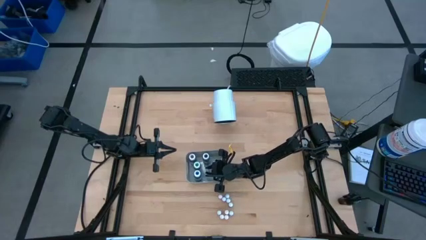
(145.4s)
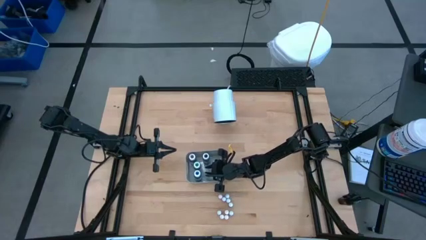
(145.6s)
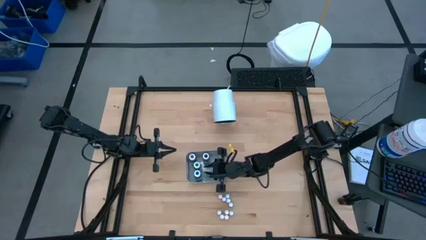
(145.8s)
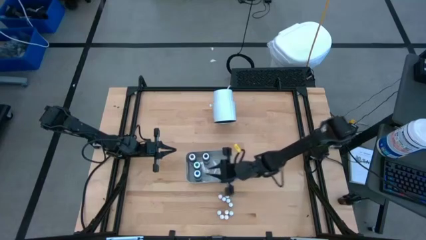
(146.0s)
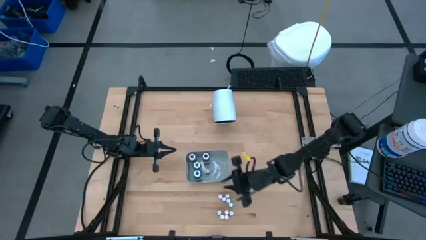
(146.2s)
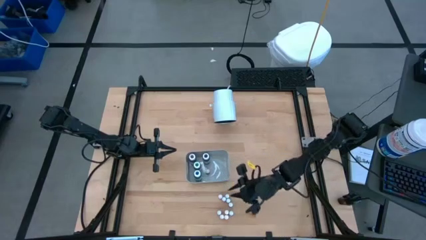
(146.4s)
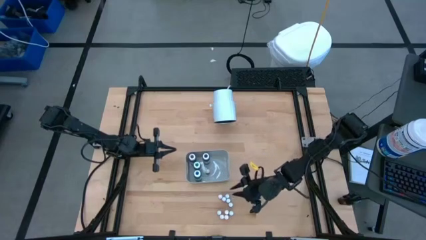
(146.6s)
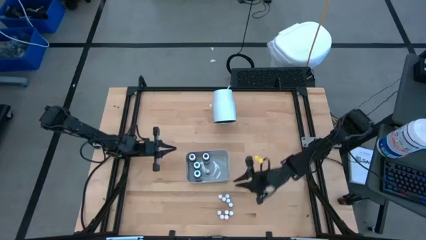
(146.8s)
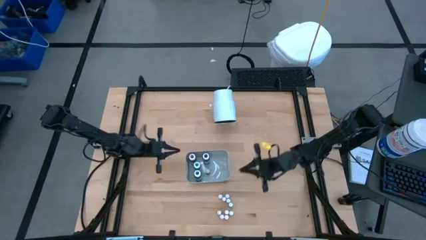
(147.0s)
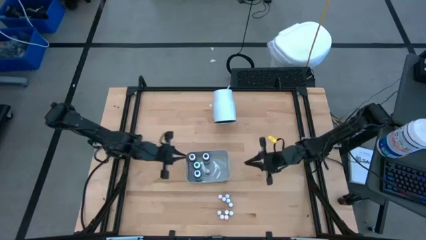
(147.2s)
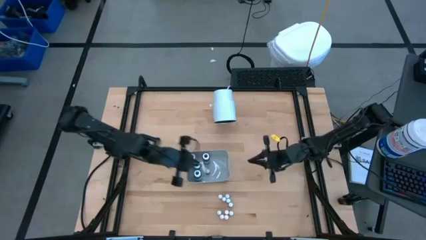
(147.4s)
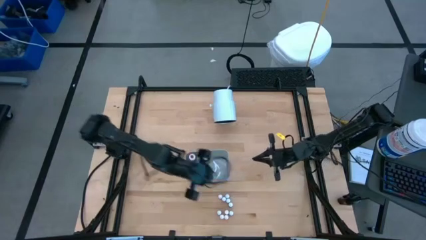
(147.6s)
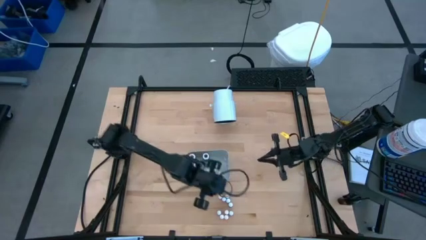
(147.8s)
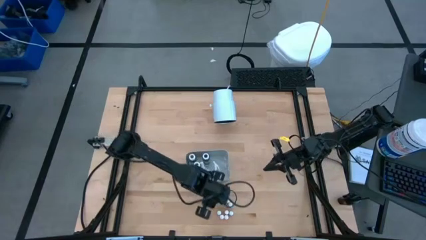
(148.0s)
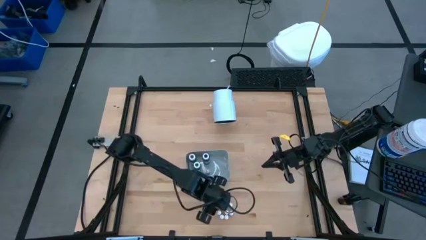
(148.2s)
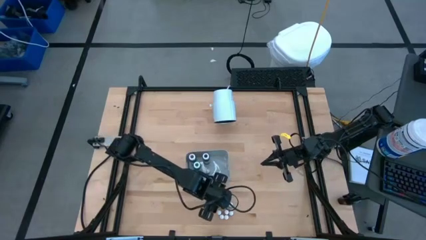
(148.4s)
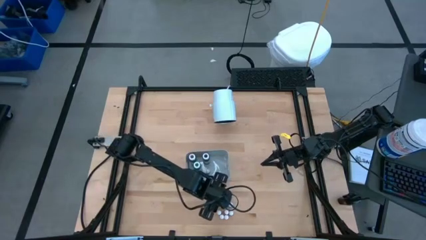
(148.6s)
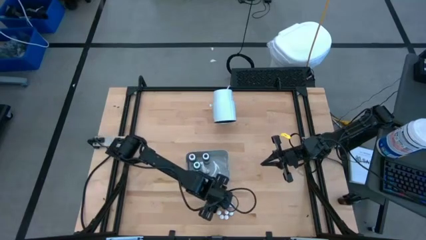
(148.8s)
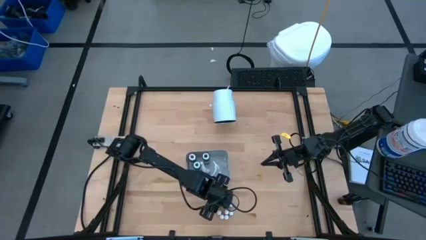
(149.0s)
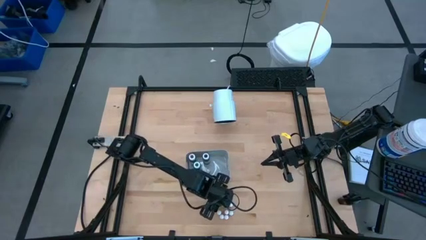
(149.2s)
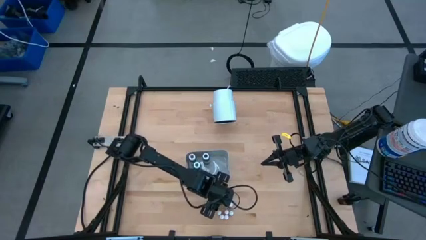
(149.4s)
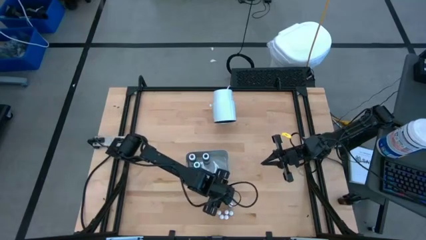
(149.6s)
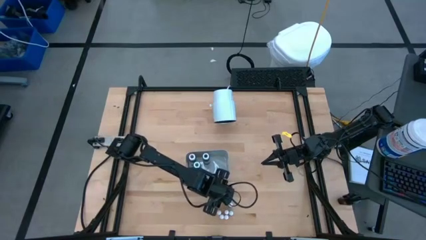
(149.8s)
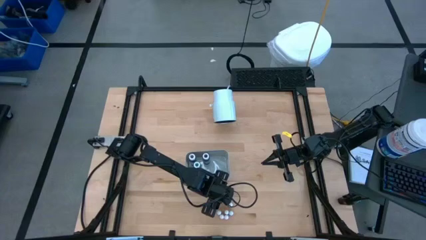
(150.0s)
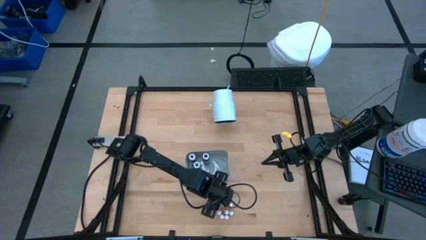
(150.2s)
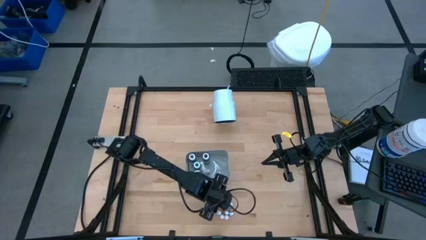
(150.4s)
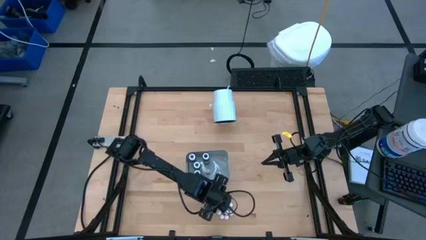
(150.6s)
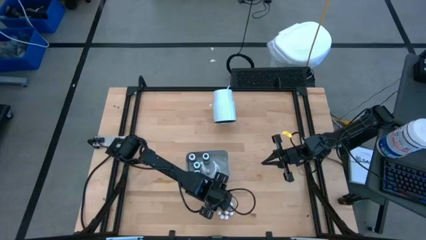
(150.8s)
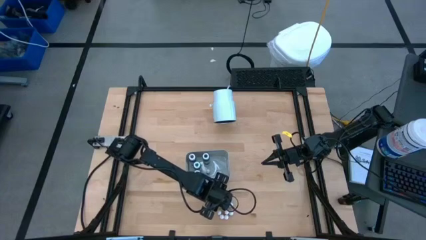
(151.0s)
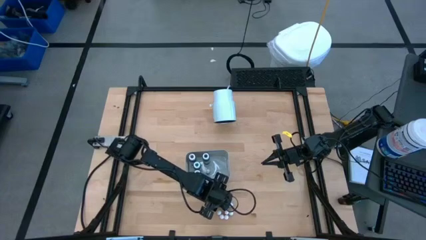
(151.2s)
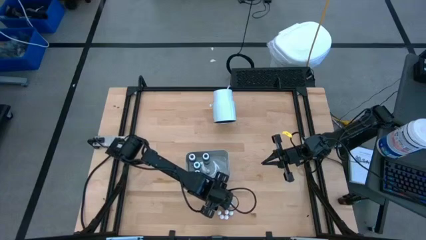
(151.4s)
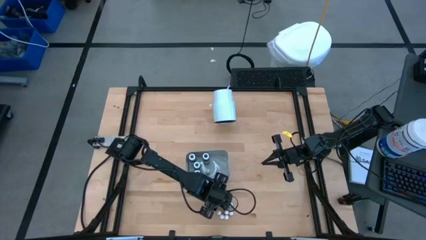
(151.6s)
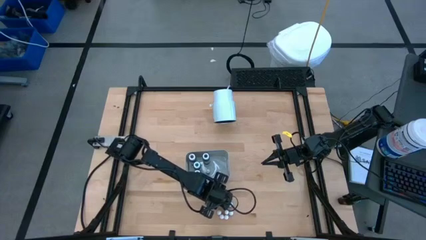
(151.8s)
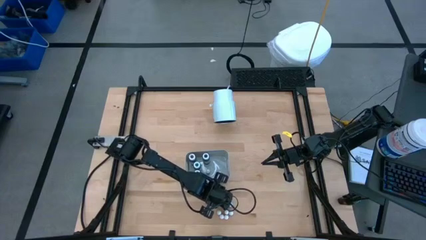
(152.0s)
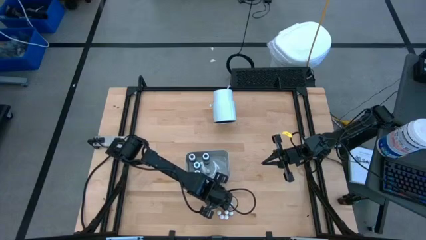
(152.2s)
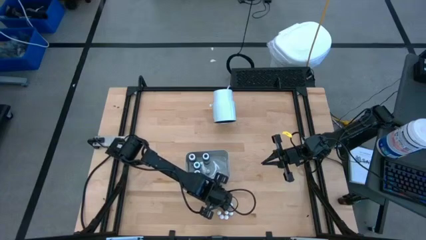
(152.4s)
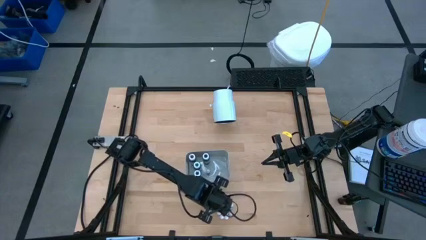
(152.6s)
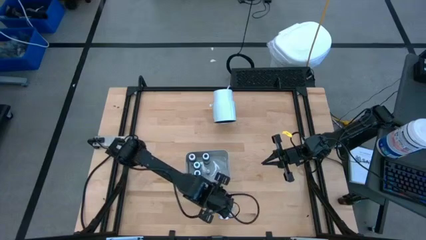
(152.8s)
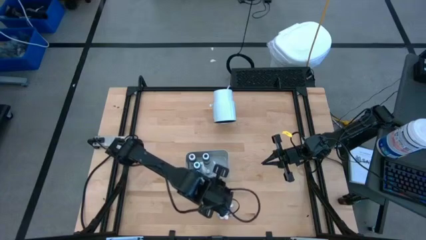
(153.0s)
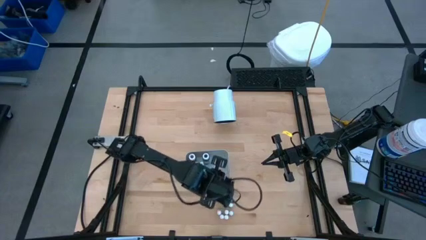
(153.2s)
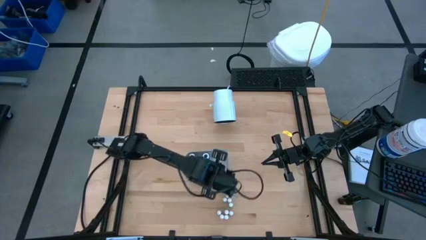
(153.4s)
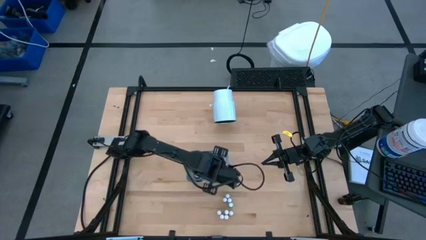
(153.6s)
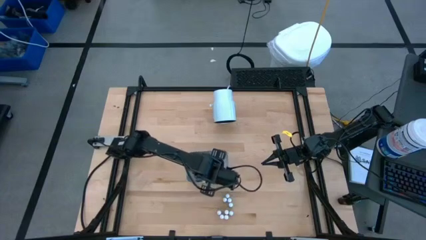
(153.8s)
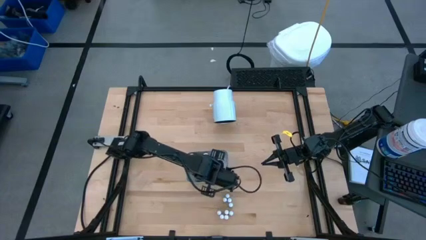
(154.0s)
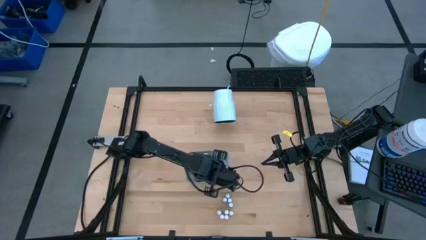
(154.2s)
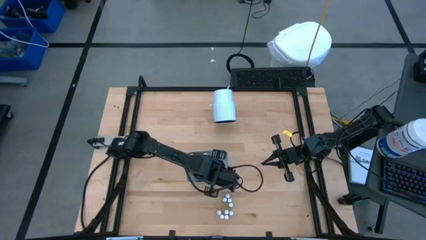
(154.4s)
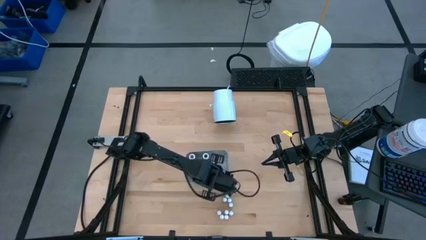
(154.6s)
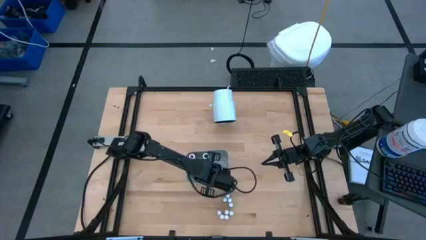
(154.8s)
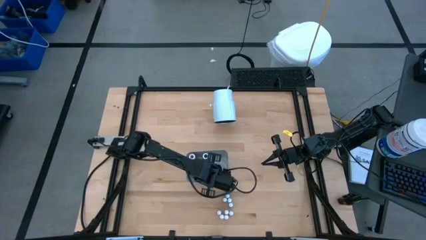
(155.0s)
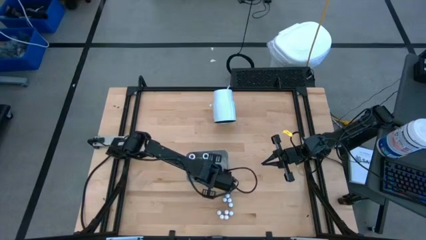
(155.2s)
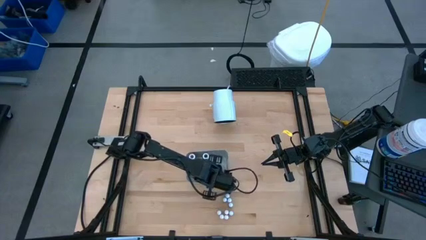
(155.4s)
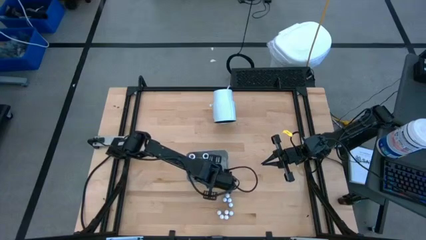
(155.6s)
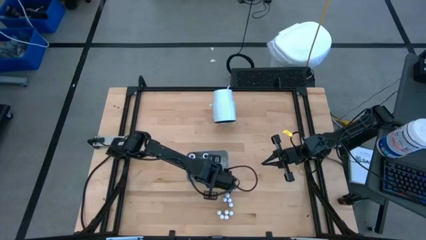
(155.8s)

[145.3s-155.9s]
Task: Pick & Place food coloring
Put the orange food coloring bottle into the gray bin

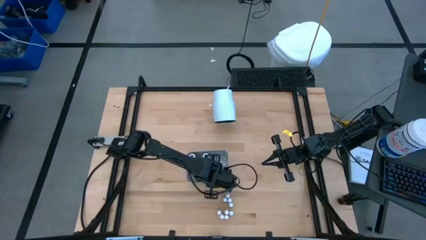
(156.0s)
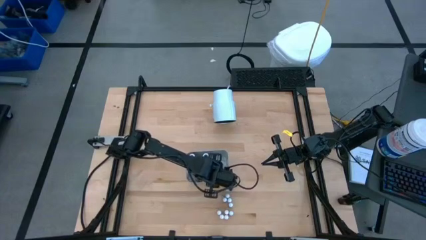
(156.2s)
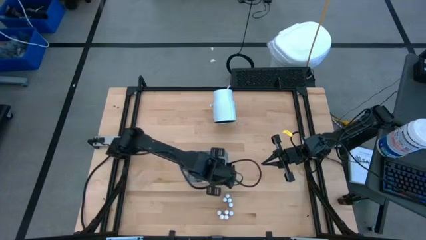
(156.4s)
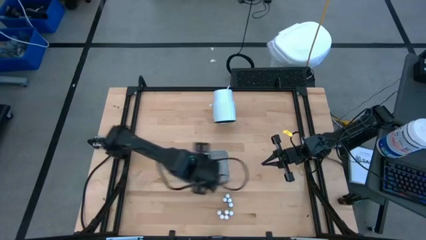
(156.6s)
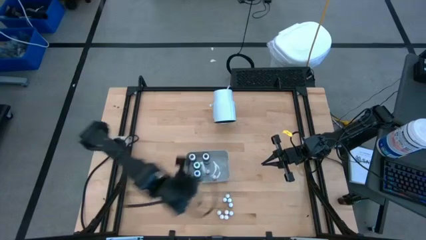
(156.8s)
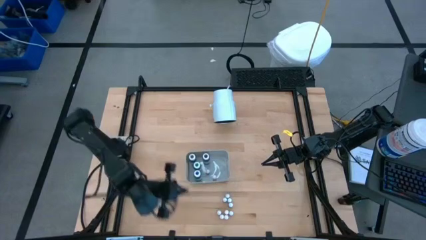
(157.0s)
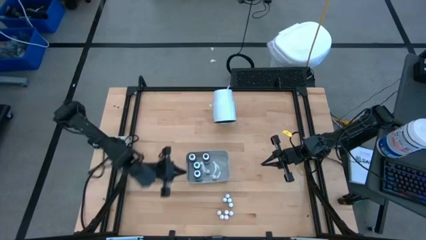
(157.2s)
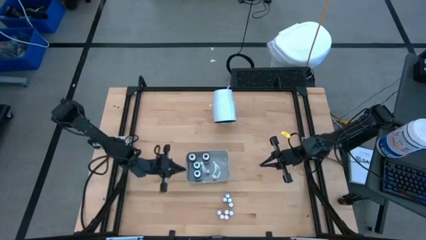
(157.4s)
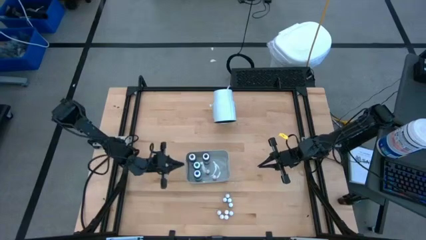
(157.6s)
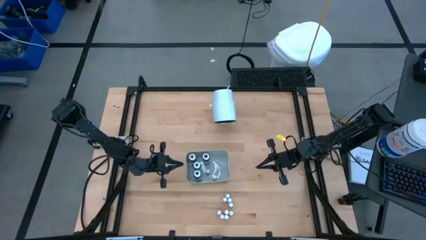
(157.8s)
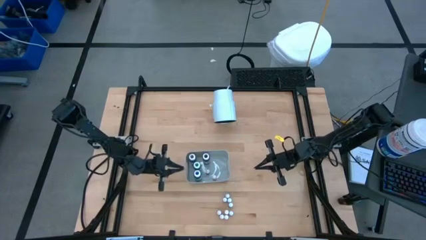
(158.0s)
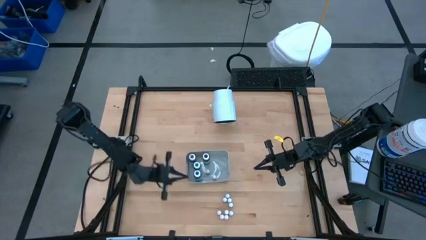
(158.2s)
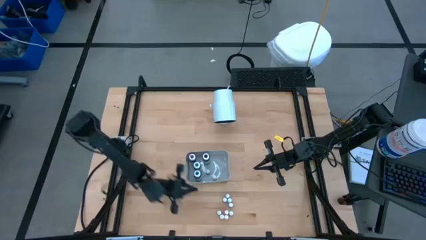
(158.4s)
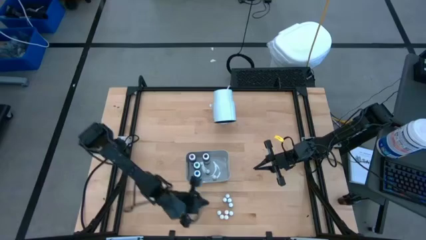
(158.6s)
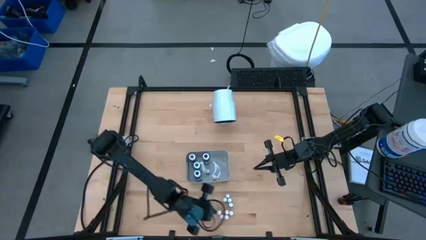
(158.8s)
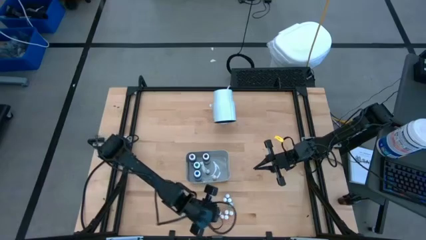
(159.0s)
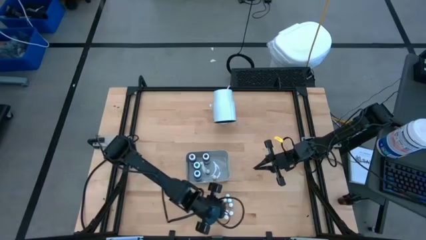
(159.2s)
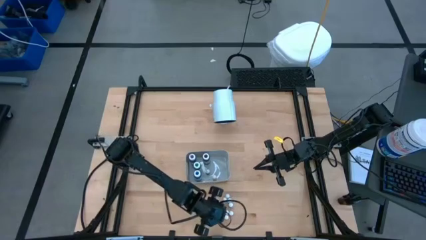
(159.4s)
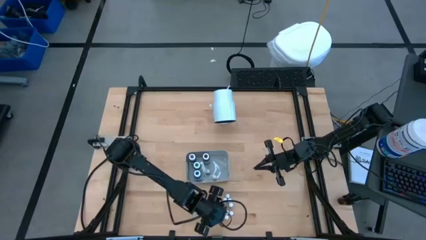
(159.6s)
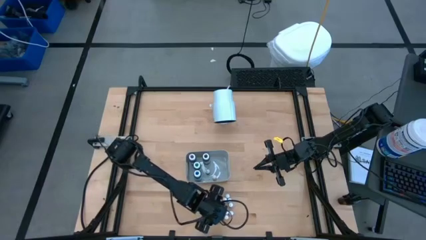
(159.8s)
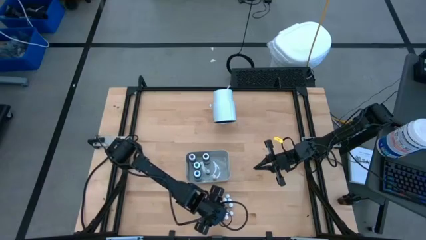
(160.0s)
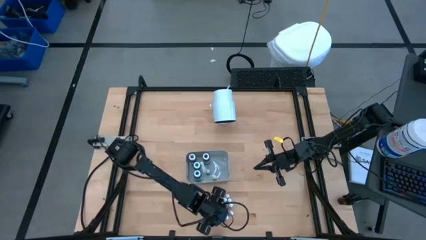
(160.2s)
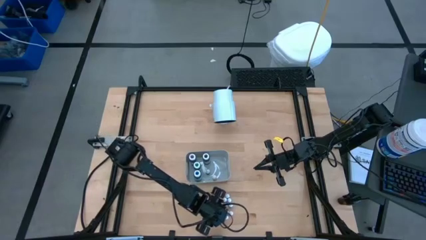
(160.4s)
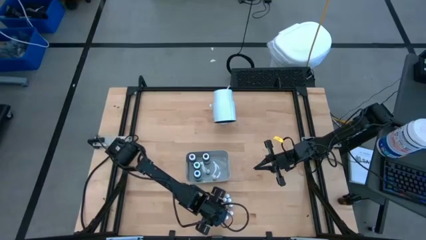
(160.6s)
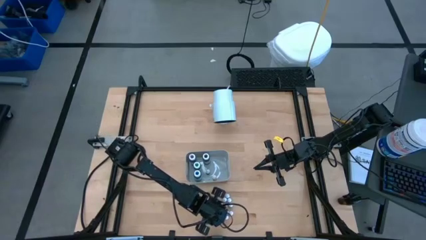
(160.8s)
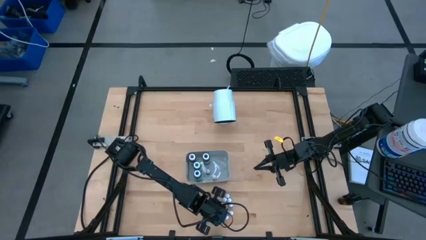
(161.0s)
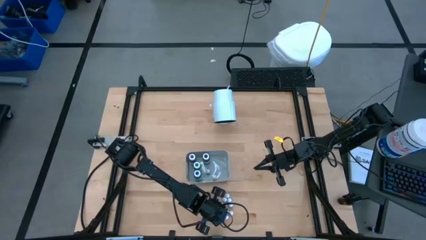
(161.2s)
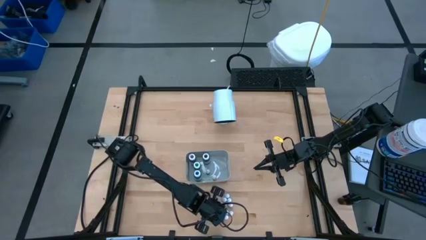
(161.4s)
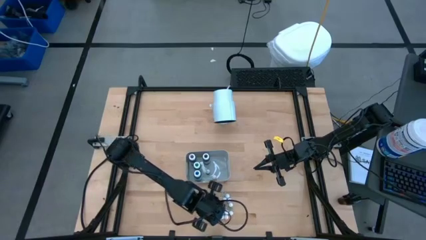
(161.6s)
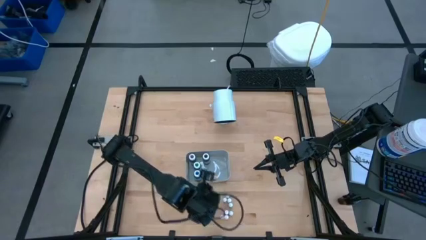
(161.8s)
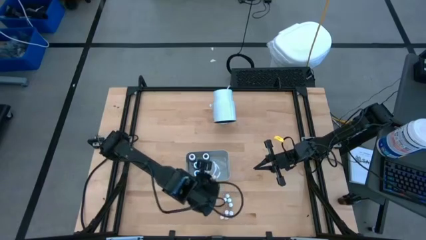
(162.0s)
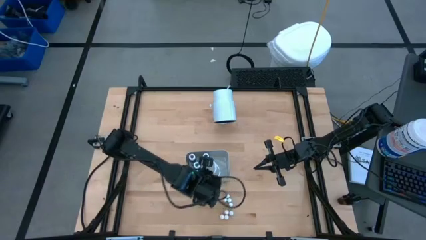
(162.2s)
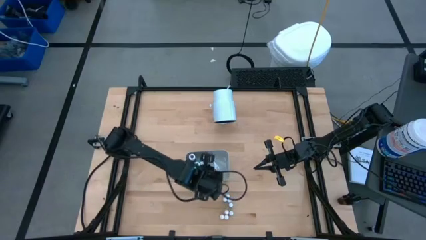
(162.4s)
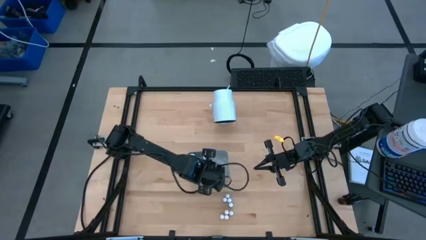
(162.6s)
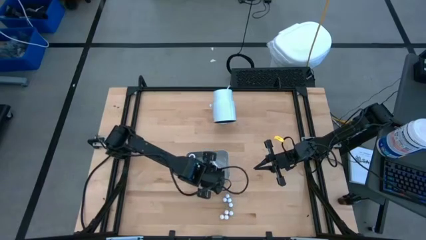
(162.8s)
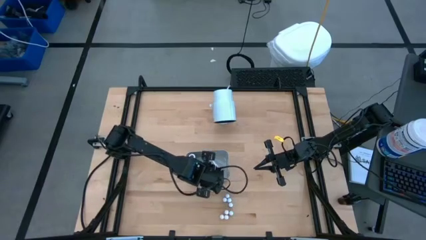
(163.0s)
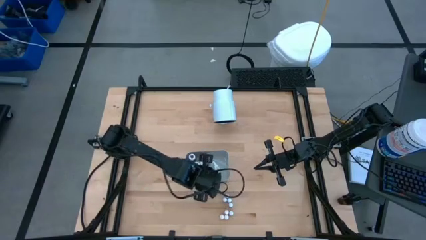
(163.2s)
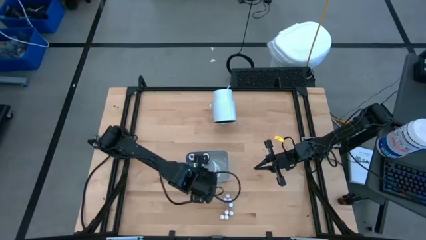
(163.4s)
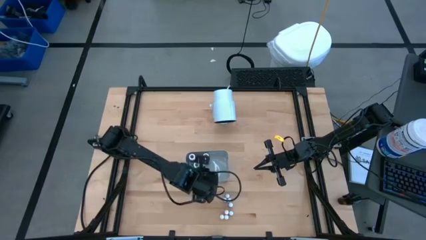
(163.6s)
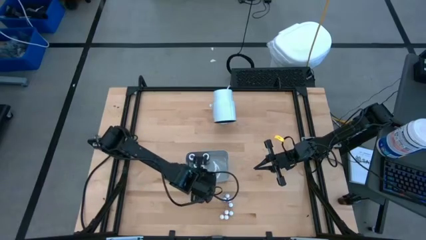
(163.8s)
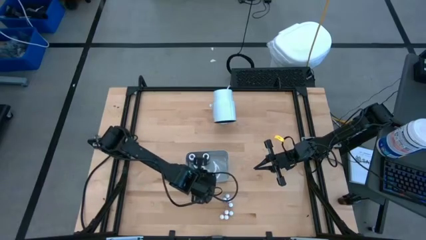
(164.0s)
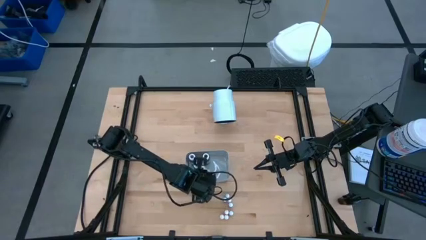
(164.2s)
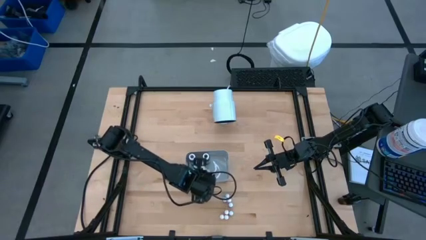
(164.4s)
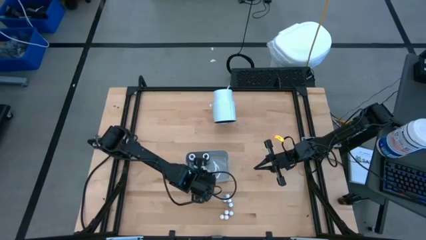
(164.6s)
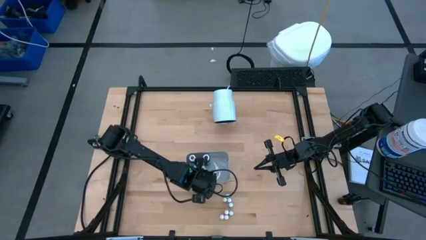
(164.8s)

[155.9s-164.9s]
Put the small purple food coloring bottle into the gray bin
